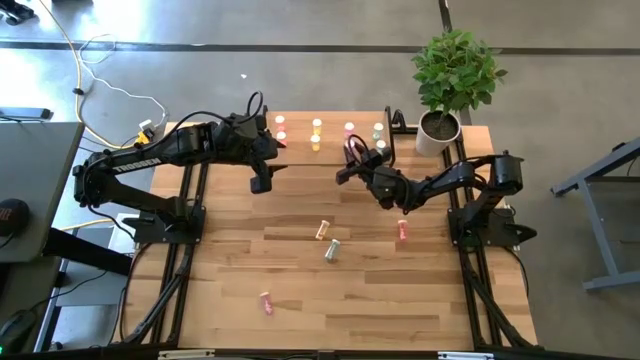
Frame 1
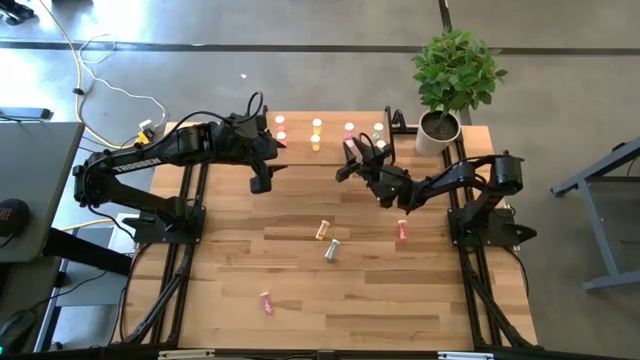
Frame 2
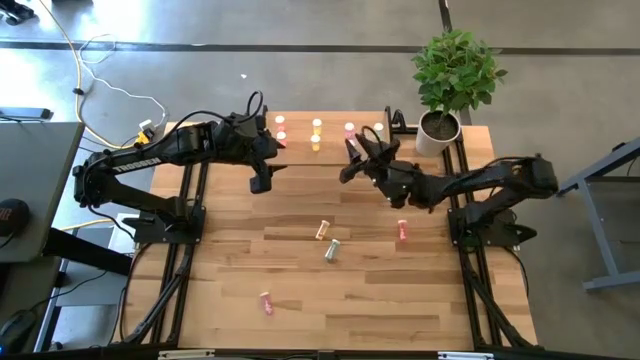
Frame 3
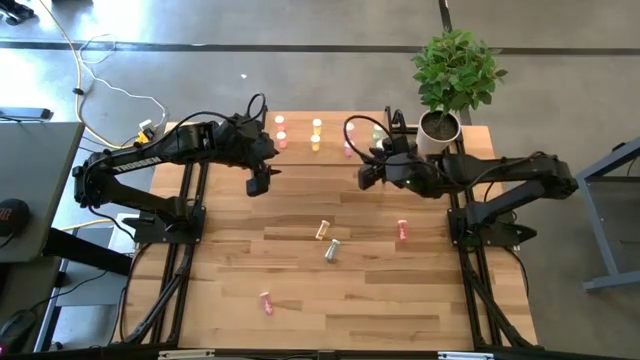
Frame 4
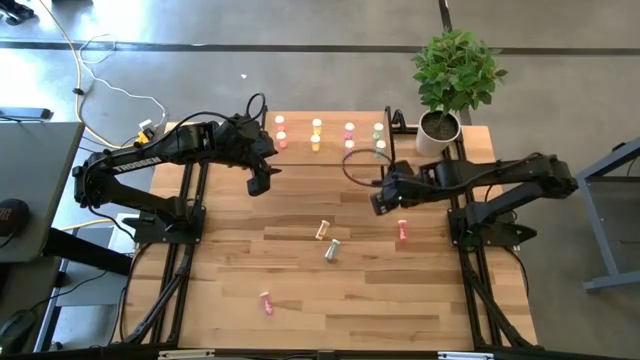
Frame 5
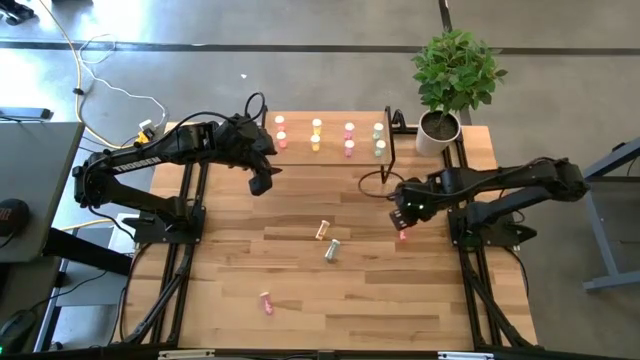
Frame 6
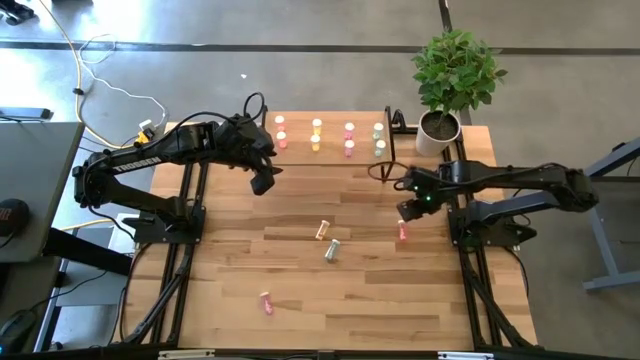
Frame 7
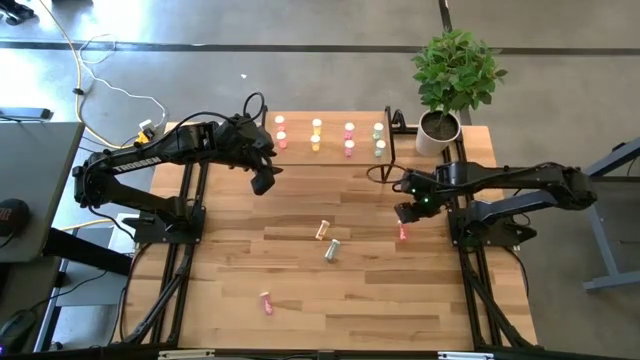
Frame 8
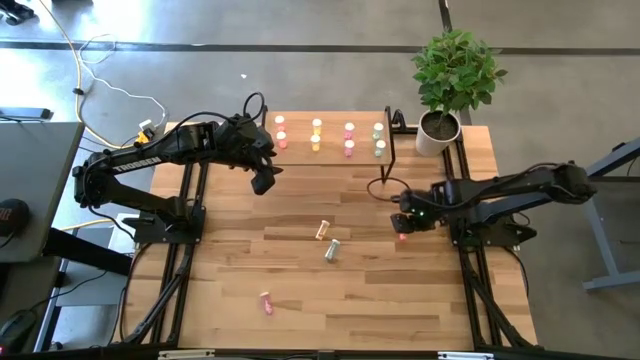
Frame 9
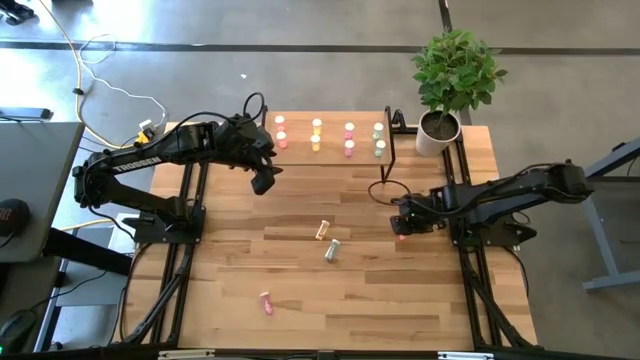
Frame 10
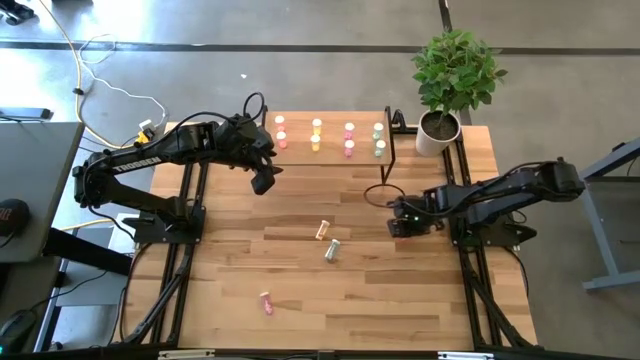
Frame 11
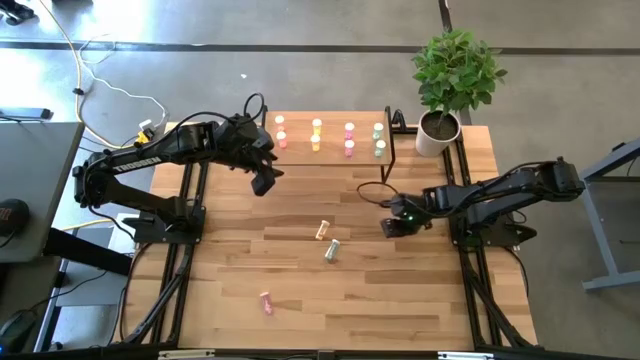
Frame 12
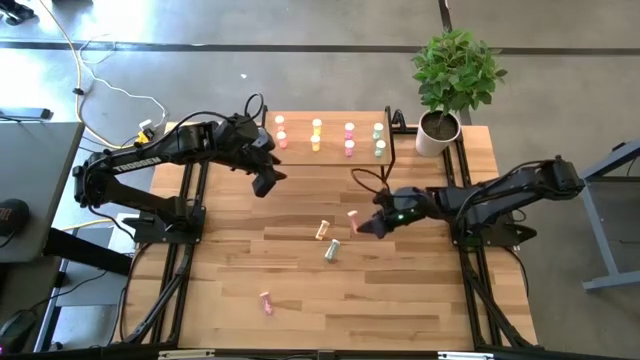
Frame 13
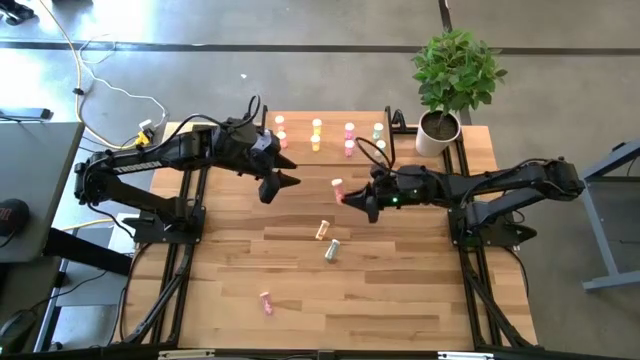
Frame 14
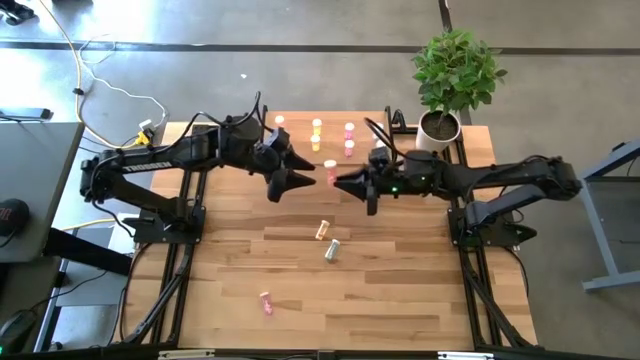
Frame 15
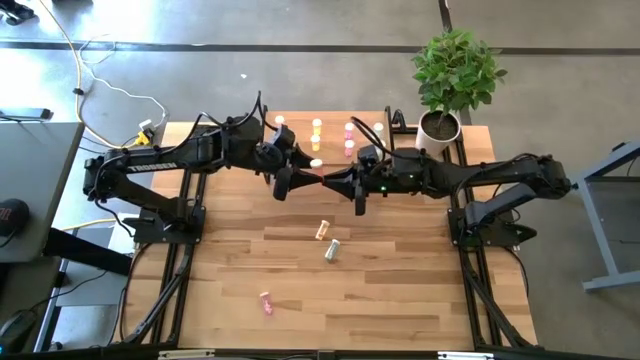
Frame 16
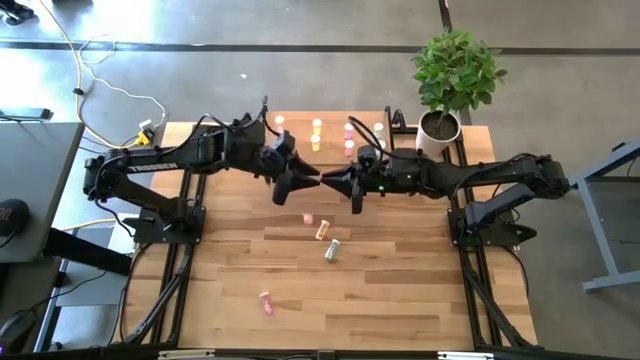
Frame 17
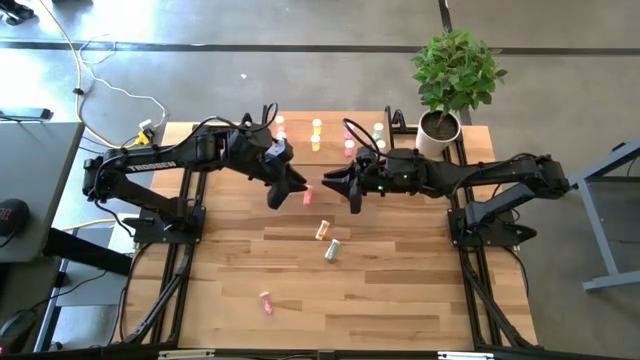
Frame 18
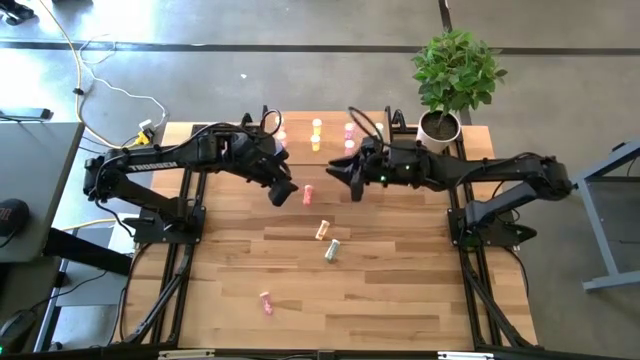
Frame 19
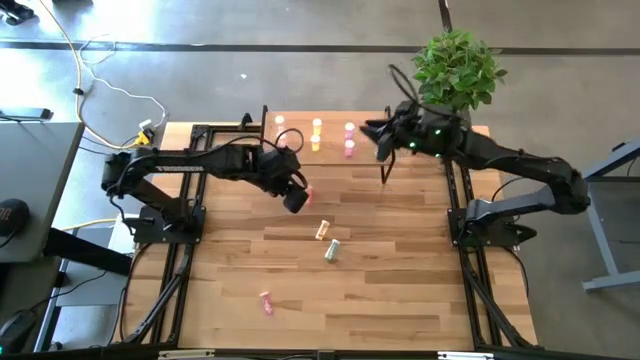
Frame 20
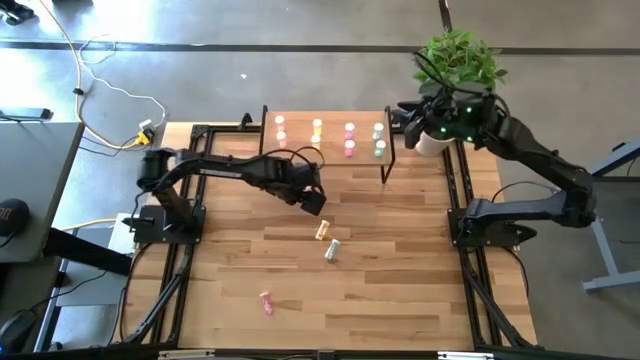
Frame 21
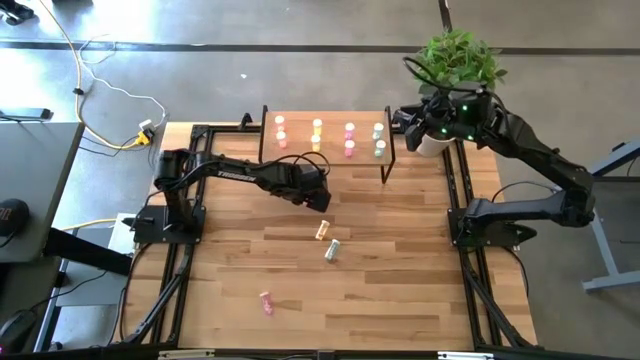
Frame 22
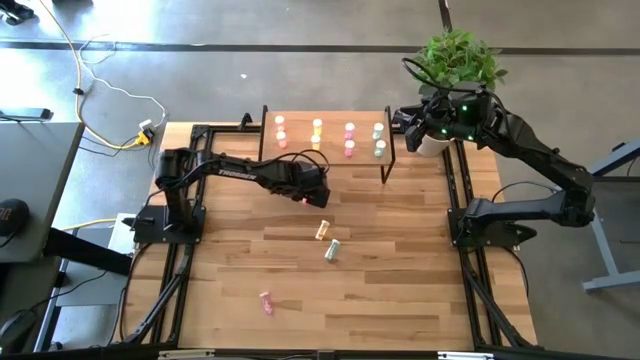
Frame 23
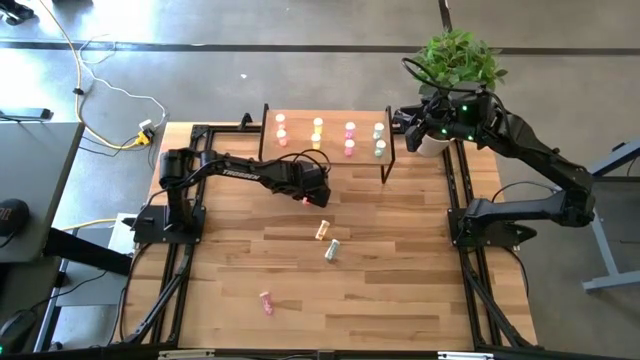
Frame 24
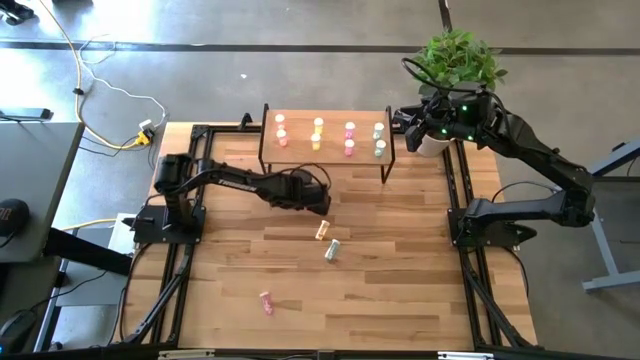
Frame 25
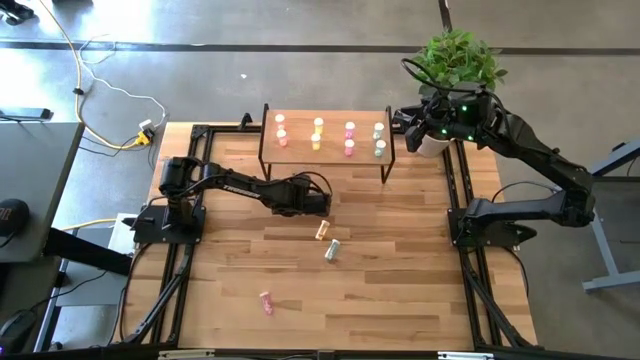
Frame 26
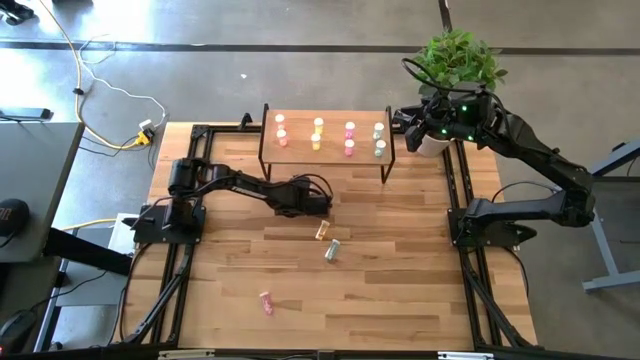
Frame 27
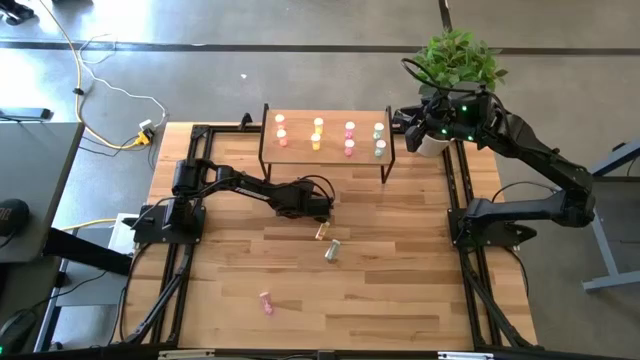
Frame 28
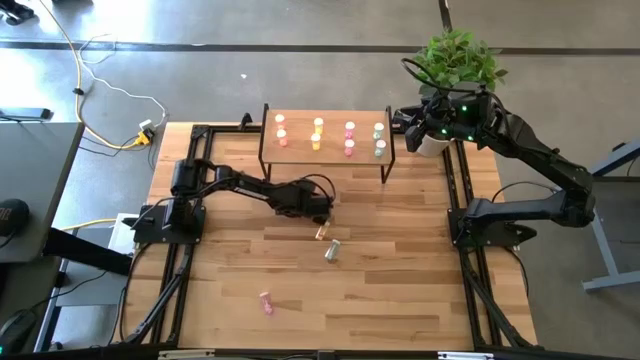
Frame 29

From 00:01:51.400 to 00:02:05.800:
Task: Pick and place medicine bottles onto shelf by color
Put the pink pill bottle on the shelf aligned with the pink pill bottles

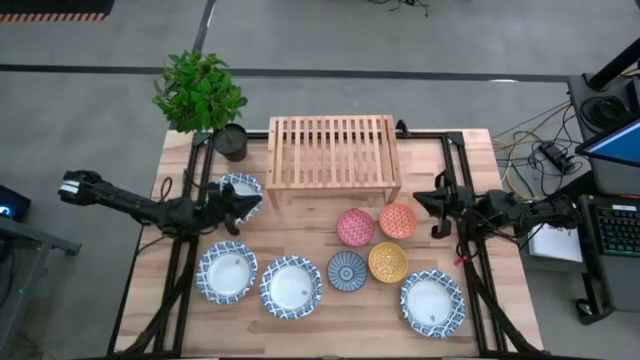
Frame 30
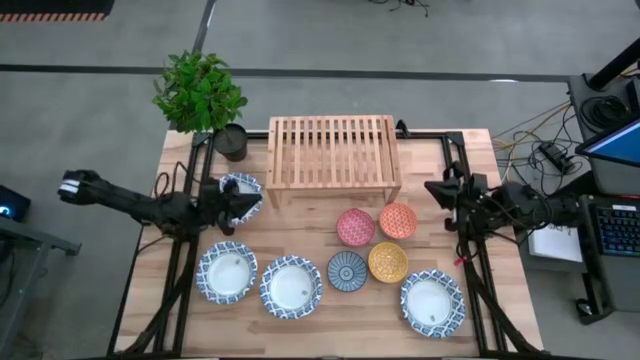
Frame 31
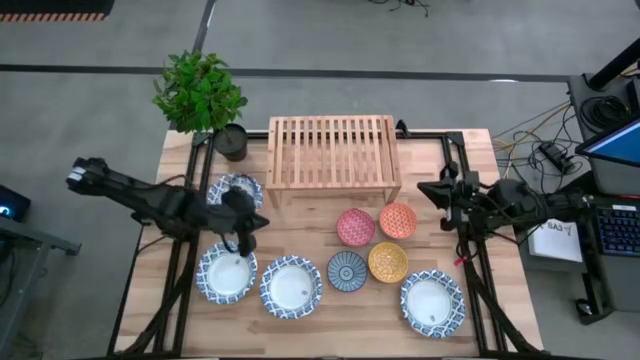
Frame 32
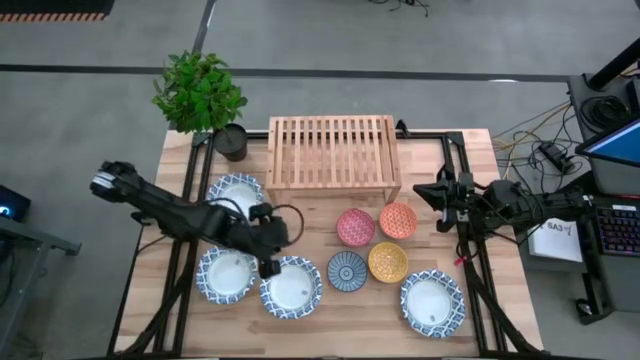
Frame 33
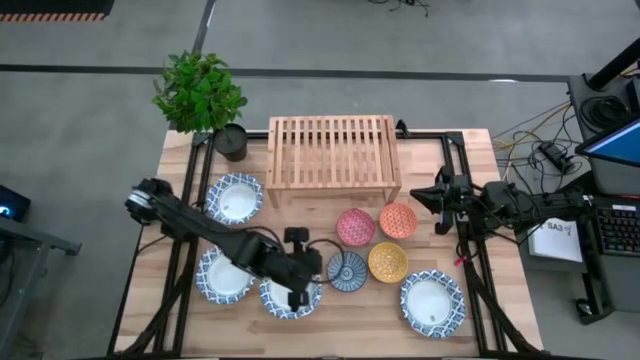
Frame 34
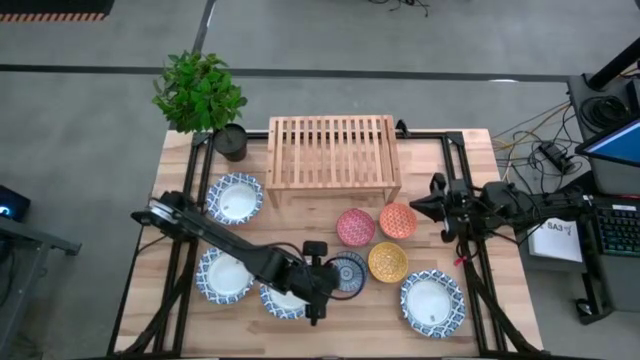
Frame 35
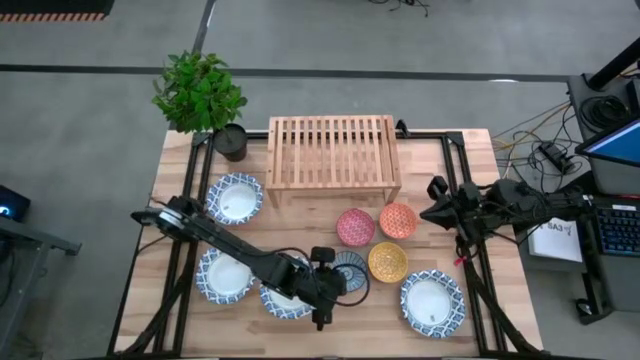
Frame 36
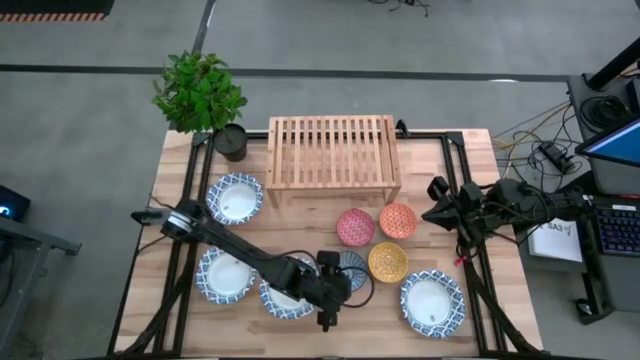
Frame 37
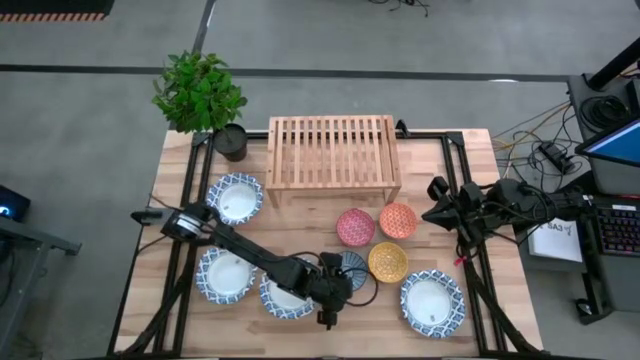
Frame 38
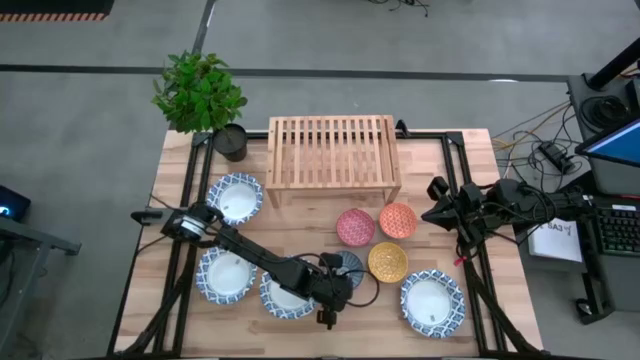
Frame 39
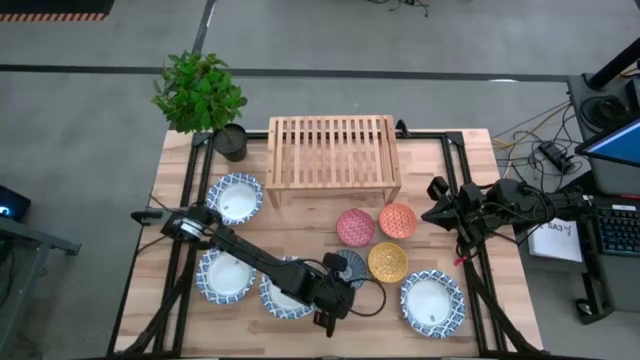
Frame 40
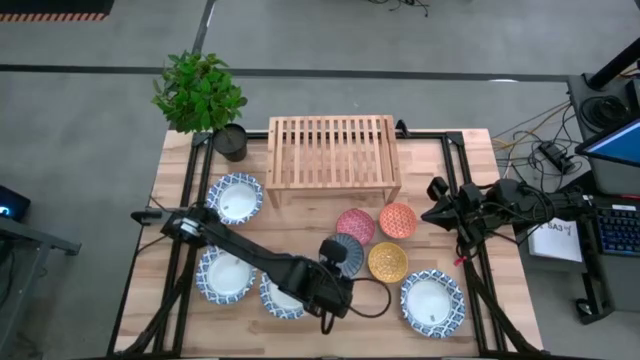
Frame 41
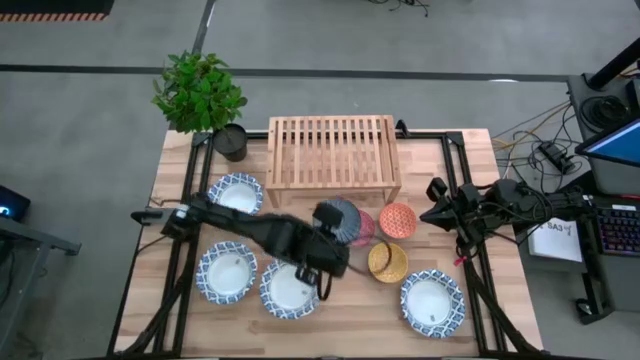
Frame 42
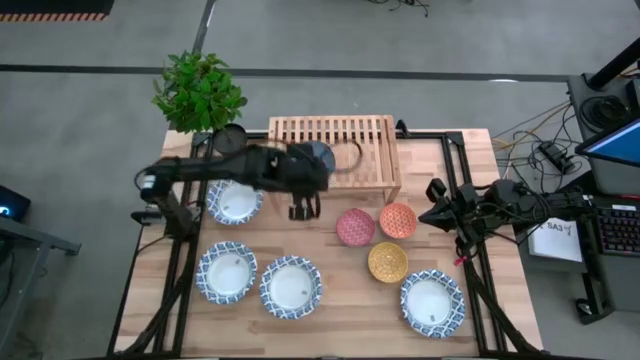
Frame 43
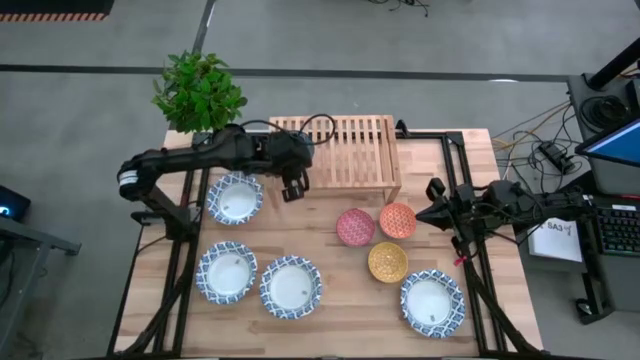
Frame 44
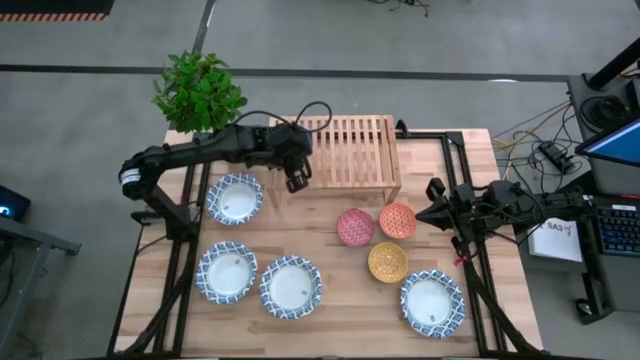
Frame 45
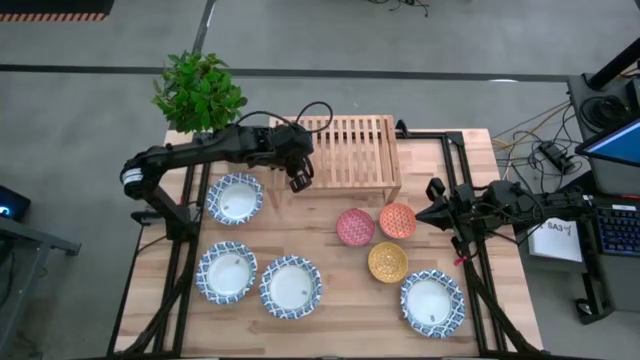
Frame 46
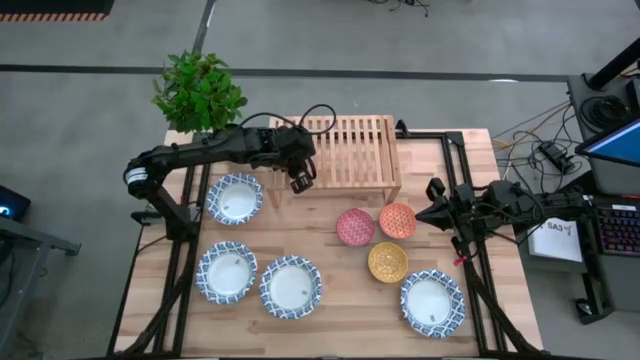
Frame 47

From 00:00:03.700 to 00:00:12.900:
Task: Place and stack bowls onto a shelf
Put the blue bowl on the shelf
